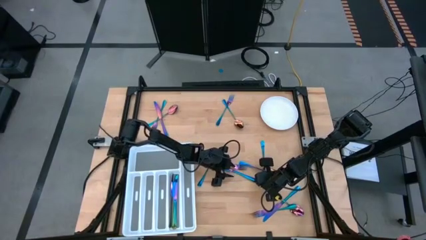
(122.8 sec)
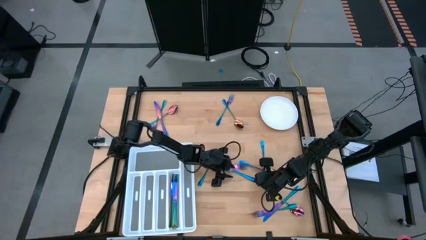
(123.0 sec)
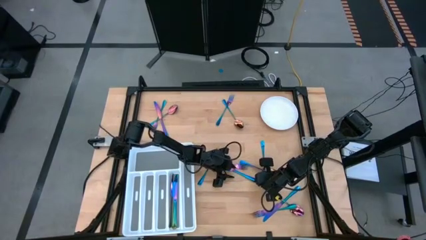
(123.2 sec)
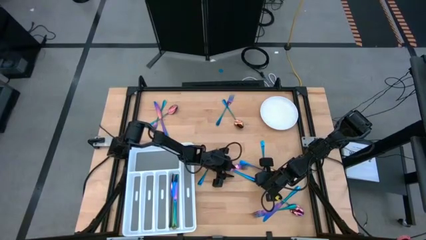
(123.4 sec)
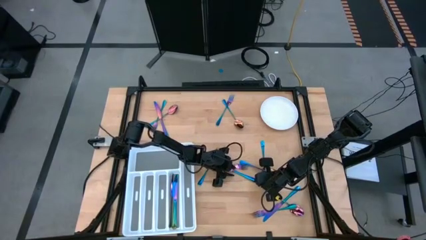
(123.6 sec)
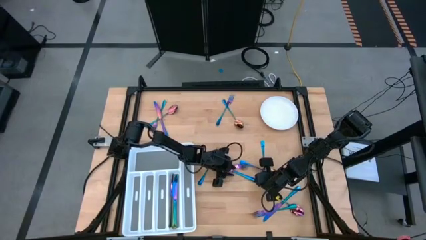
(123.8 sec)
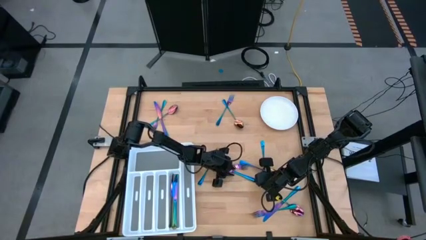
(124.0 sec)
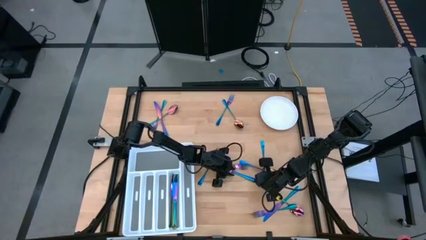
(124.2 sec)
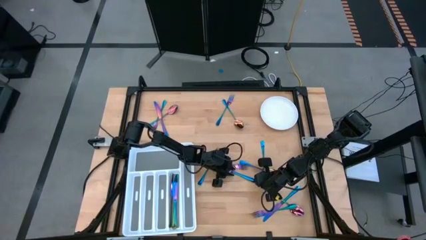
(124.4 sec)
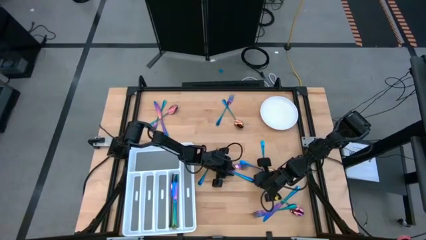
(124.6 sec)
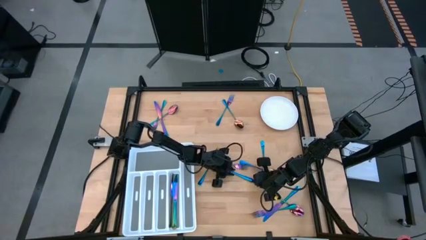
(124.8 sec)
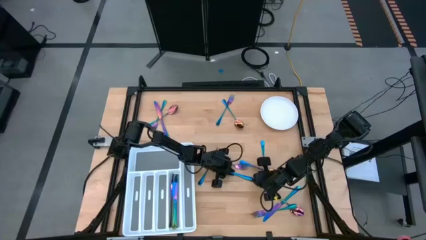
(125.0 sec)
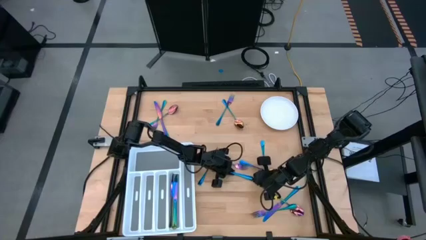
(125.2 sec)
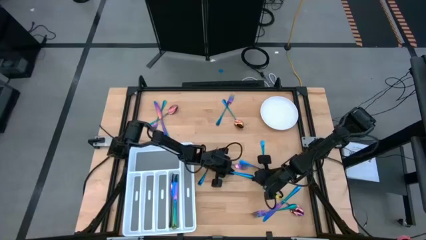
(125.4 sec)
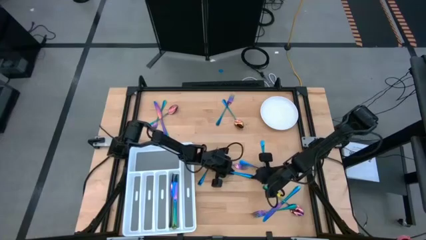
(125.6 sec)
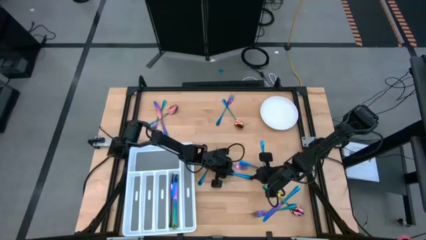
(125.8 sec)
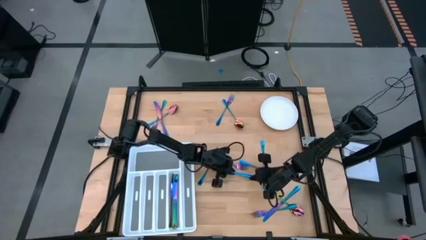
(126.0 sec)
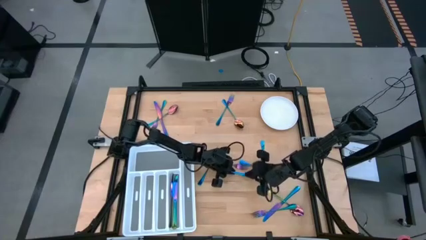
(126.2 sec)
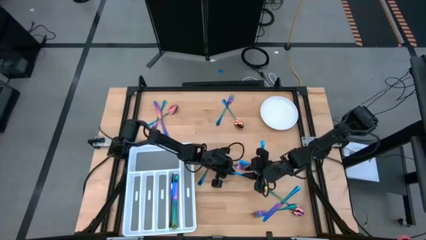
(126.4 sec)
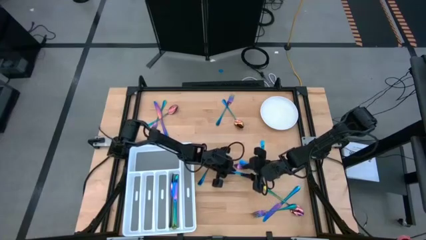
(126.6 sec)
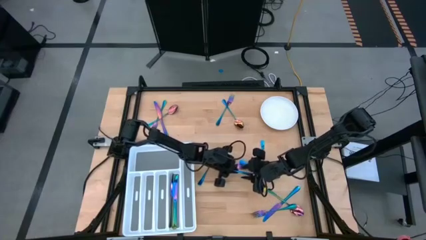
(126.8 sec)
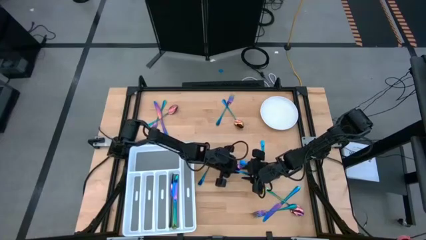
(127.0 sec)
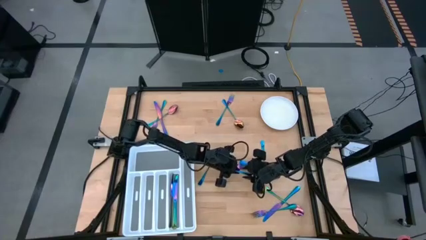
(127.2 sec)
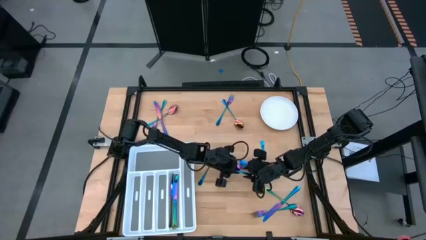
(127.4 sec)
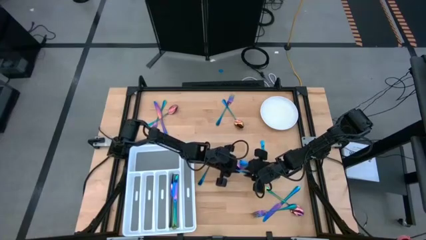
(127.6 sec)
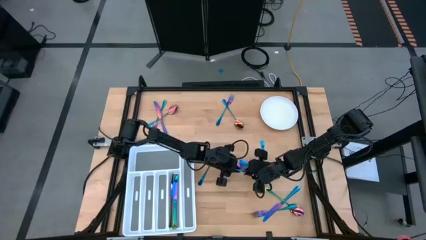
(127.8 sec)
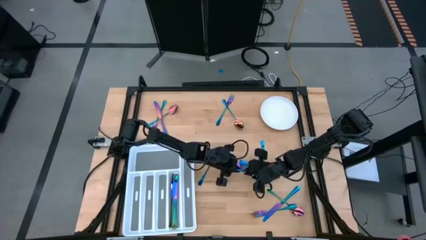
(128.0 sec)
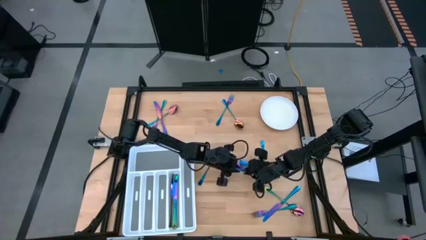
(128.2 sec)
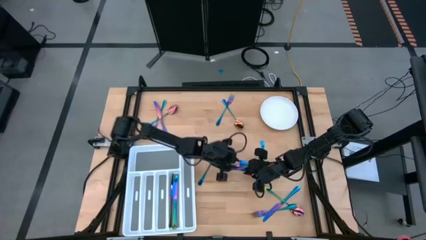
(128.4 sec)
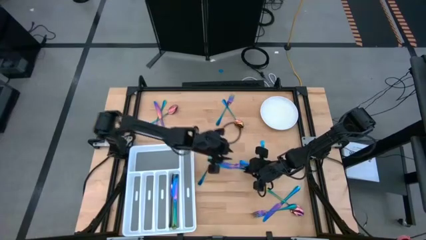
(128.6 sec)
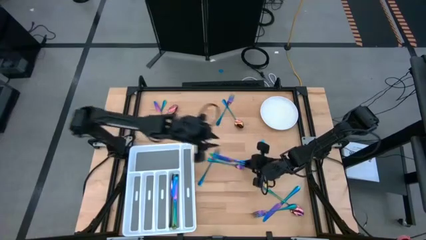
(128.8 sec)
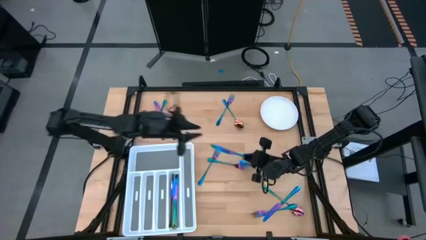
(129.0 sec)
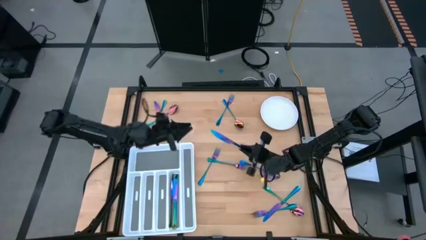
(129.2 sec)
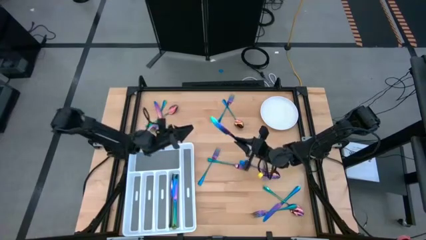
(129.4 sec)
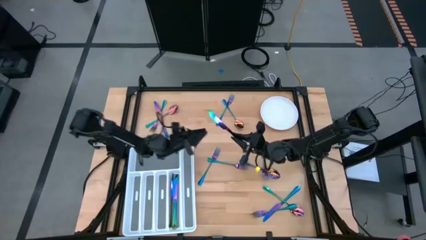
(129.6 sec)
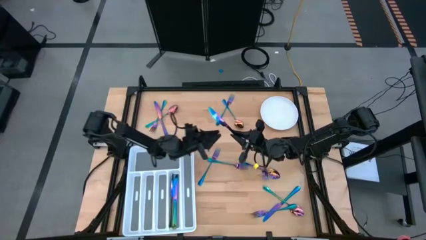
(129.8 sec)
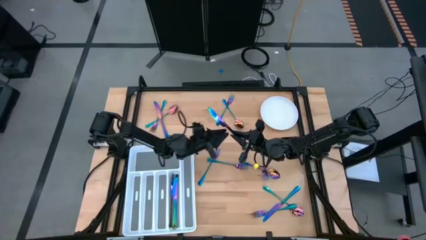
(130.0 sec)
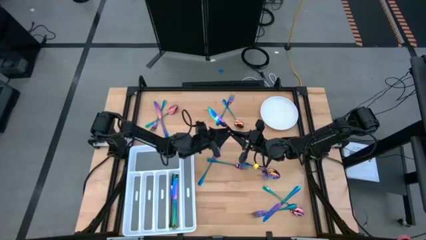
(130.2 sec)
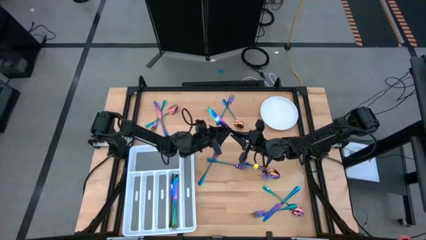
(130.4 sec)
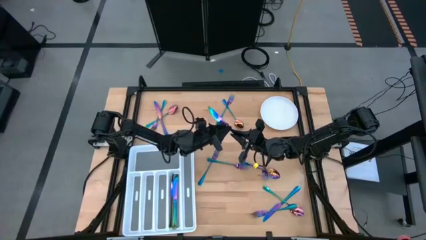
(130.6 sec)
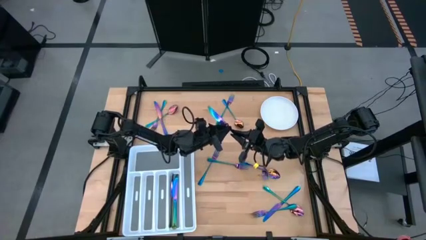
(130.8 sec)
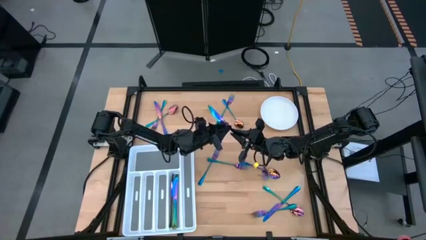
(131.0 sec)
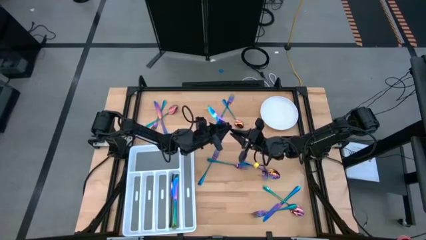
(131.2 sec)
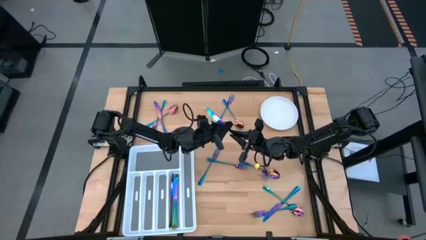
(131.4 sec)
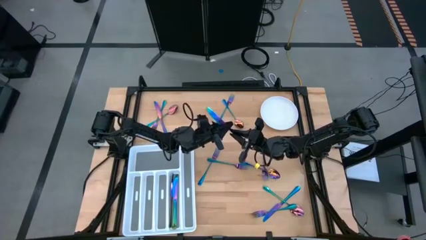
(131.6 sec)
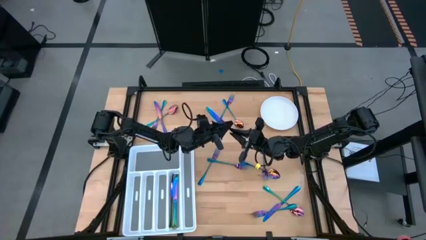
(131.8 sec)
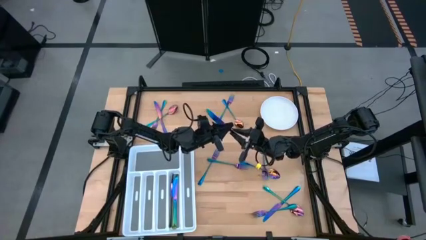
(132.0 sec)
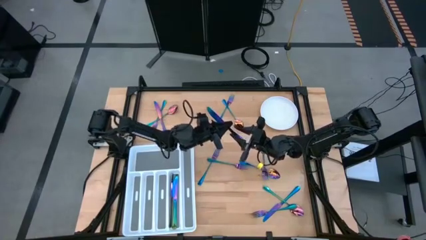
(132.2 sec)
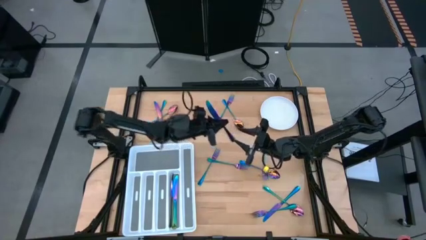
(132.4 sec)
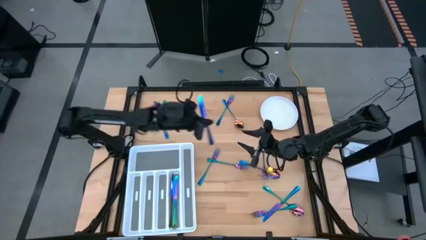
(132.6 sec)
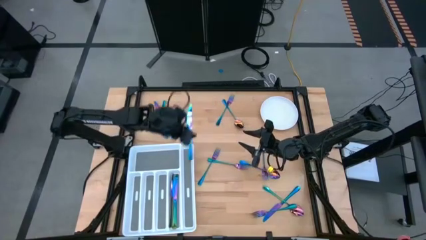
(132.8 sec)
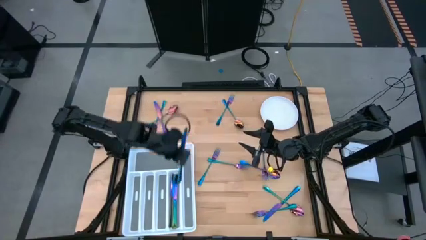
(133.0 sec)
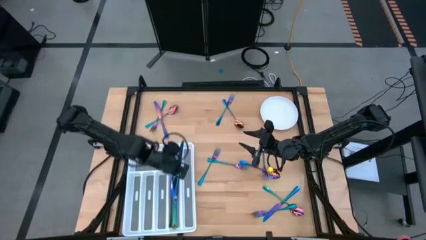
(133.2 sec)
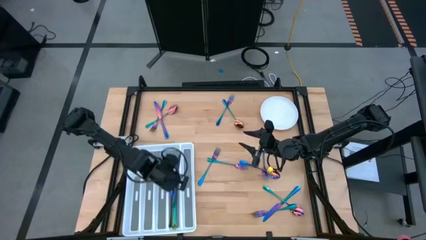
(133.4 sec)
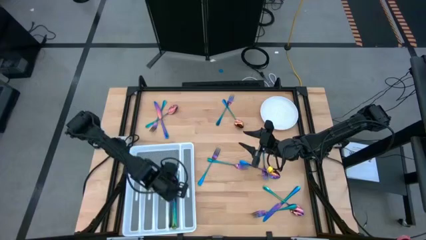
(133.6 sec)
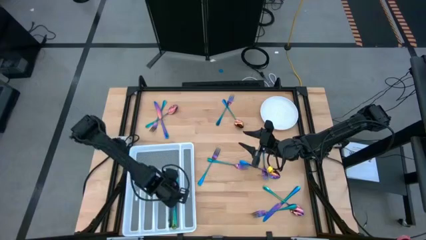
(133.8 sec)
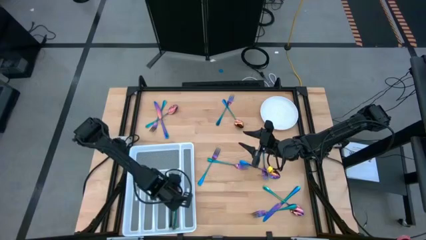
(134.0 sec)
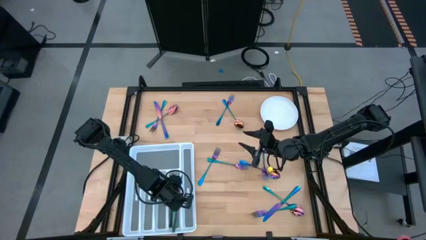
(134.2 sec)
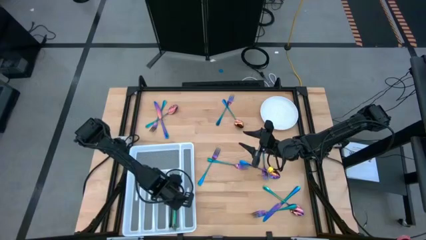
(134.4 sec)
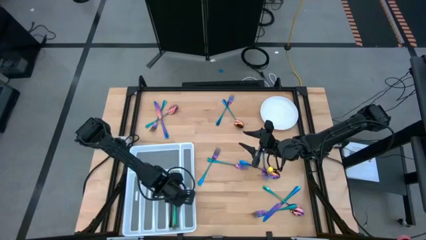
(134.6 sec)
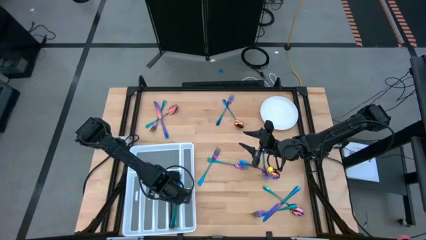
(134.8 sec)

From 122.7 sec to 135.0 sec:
Task: Sort silverware
Put the bottom left iridescent knife into the cutlery tray

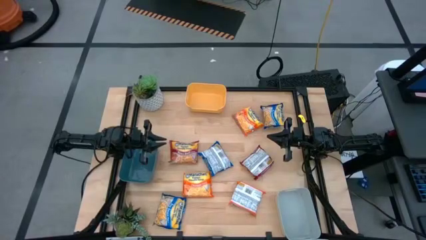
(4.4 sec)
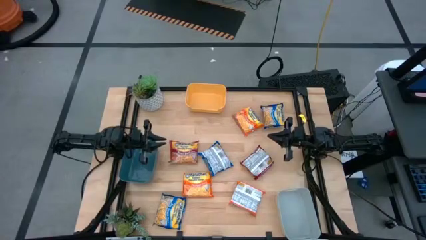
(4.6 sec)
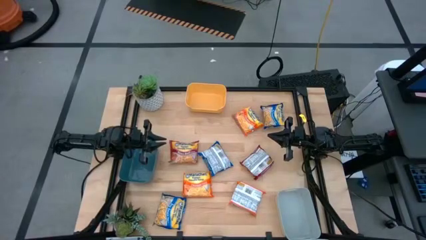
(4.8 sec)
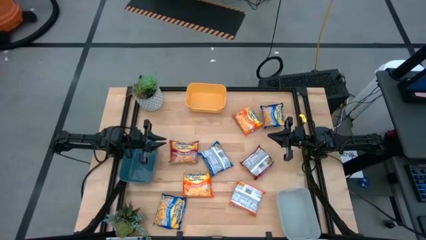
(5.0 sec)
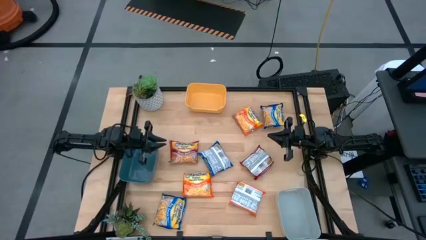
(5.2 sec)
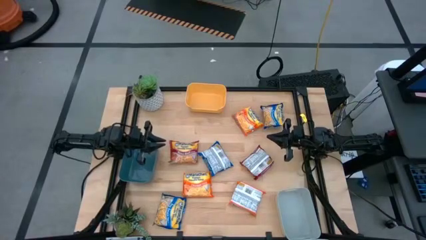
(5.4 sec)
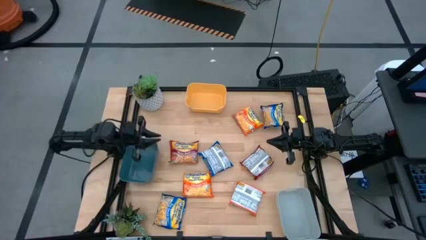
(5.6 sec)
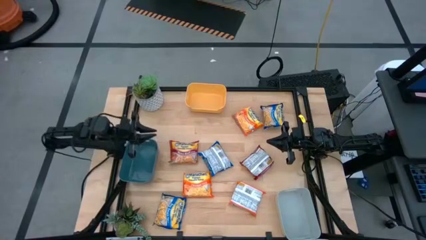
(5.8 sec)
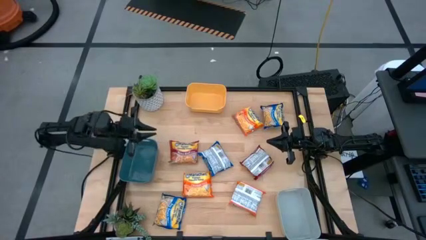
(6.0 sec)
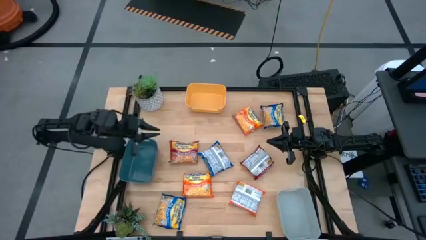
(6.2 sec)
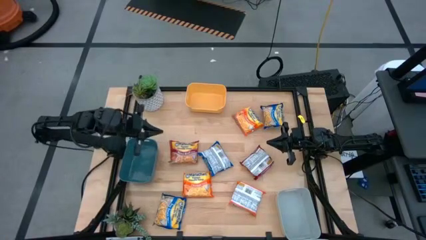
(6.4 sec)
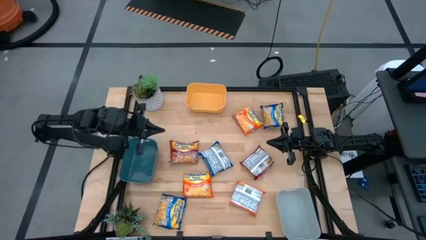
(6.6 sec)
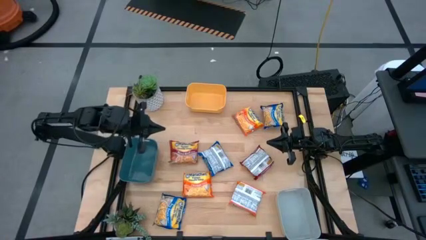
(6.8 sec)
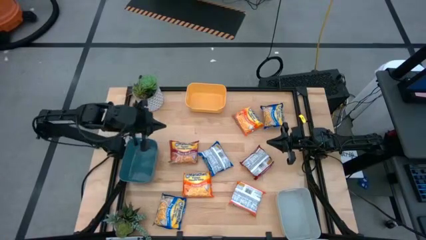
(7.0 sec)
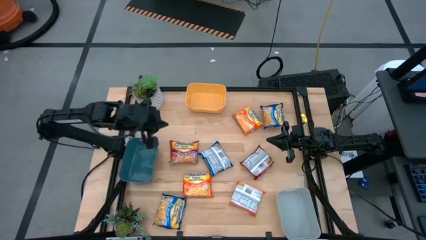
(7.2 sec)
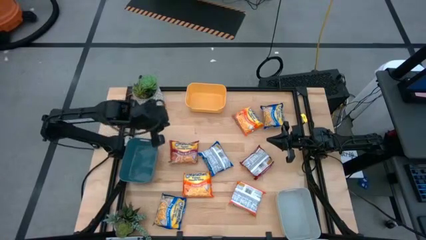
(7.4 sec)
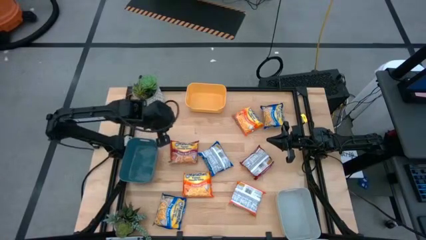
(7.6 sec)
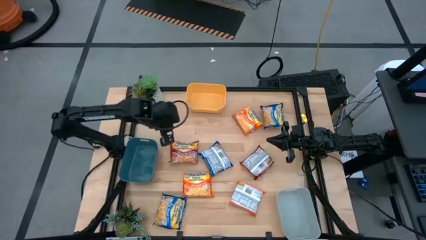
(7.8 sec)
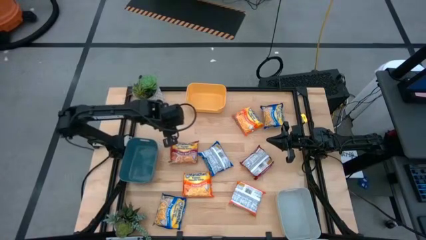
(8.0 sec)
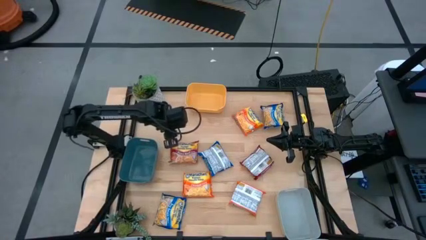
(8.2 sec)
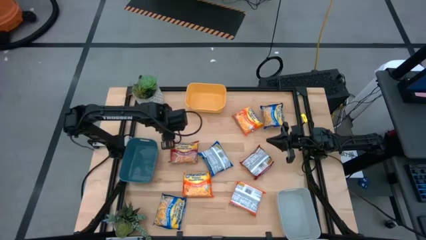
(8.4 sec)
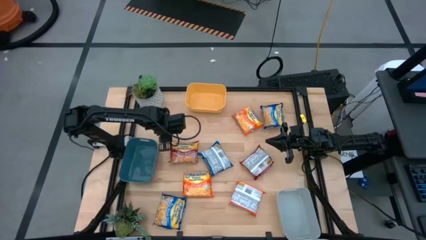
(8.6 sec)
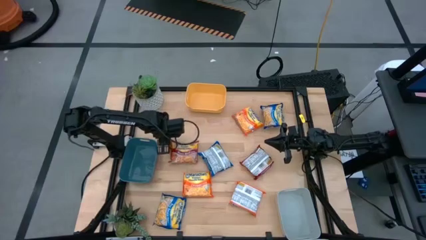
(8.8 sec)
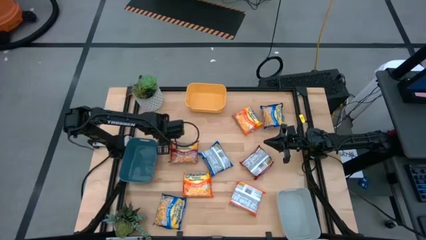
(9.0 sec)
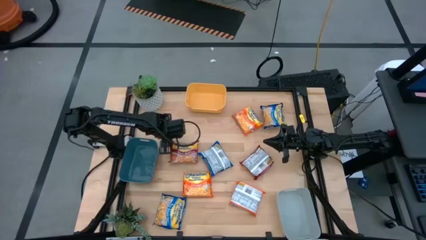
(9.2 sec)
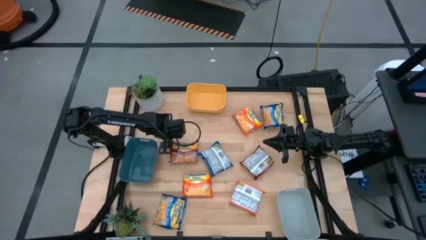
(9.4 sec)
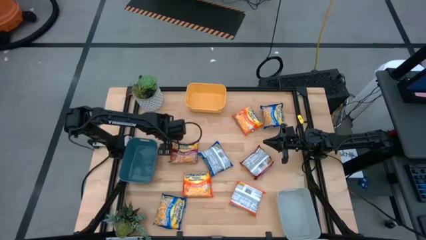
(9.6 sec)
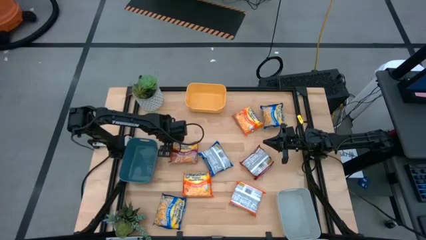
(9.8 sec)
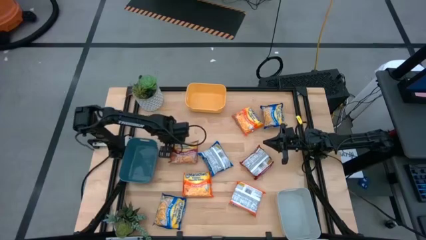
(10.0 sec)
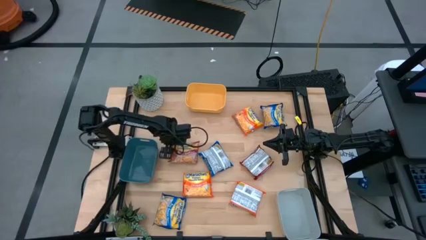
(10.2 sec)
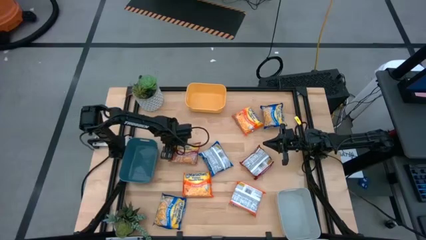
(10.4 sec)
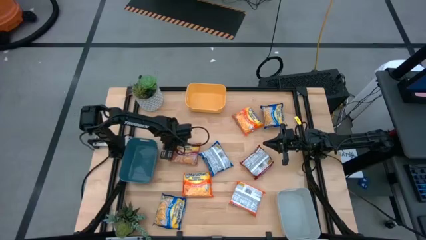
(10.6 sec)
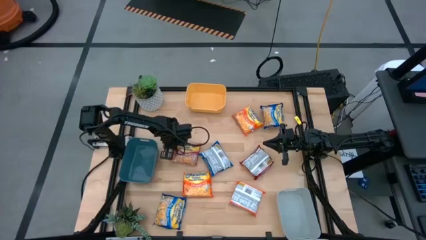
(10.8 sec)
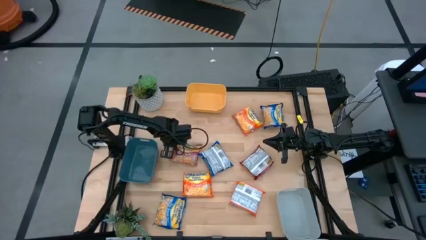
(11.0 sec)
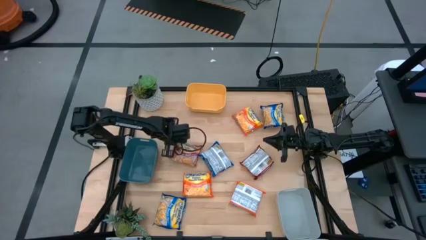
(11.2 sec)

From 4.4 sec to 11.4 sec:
Task: Sort Maruchan noodles
Put the left red noodle pack into the gray bin
